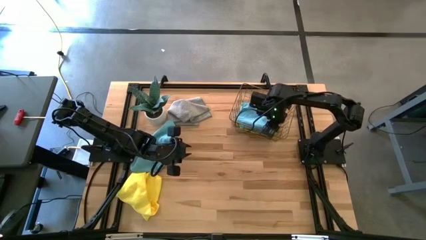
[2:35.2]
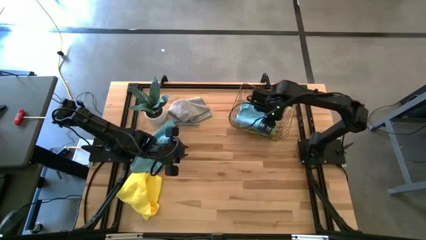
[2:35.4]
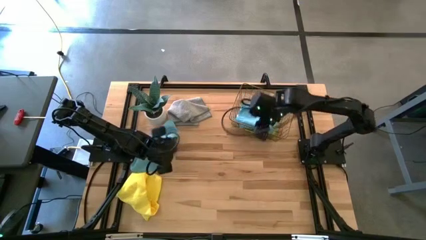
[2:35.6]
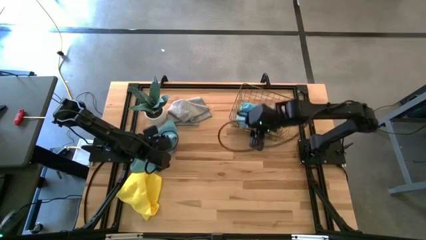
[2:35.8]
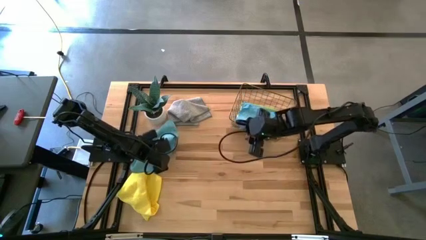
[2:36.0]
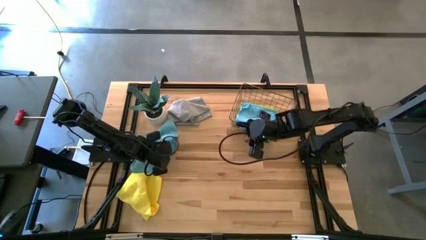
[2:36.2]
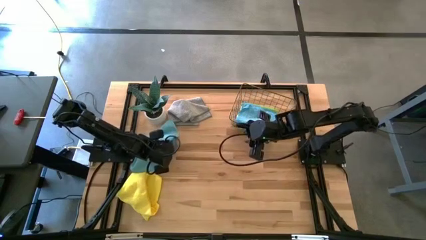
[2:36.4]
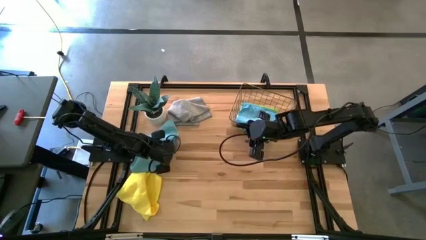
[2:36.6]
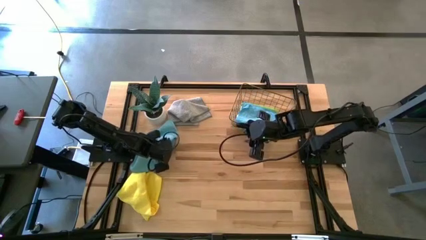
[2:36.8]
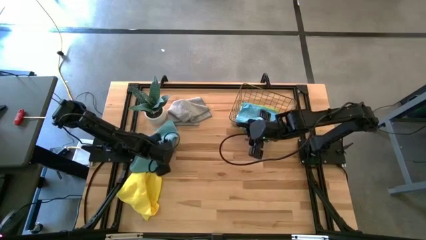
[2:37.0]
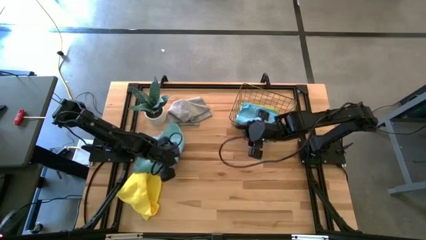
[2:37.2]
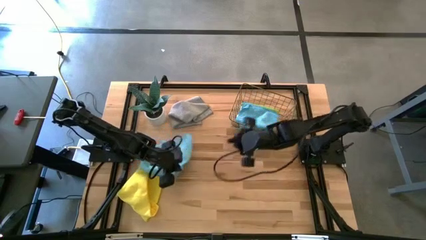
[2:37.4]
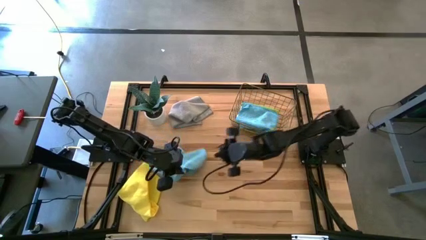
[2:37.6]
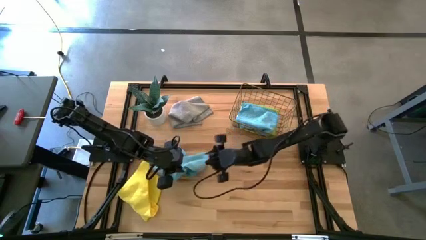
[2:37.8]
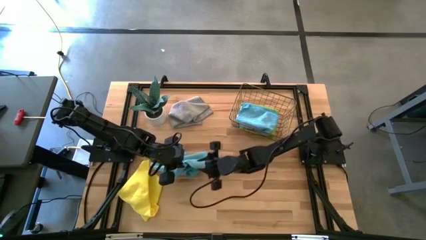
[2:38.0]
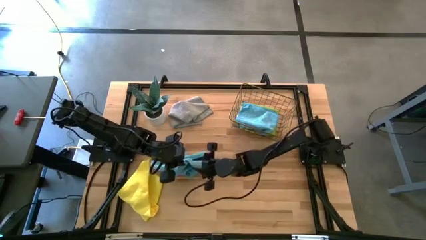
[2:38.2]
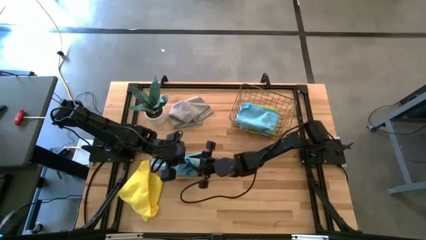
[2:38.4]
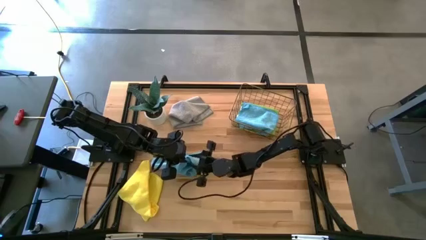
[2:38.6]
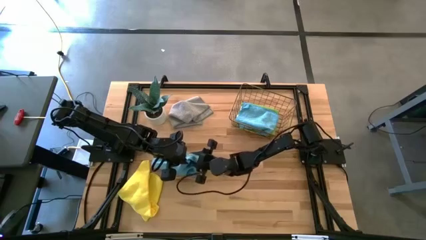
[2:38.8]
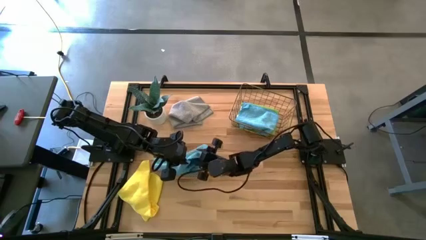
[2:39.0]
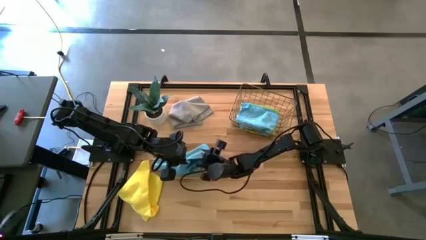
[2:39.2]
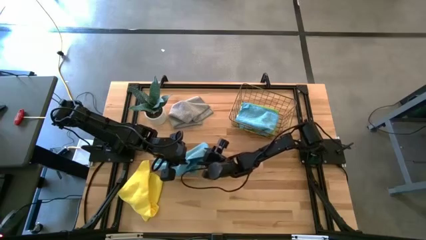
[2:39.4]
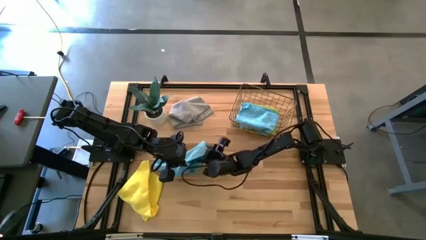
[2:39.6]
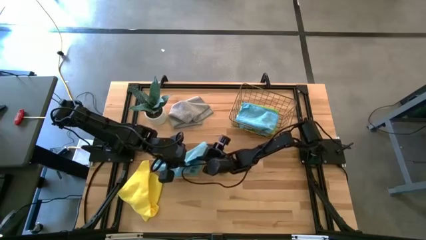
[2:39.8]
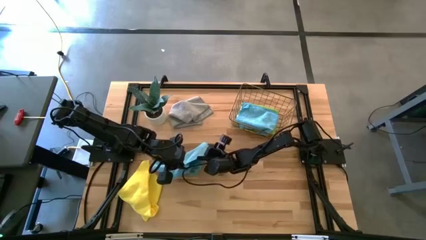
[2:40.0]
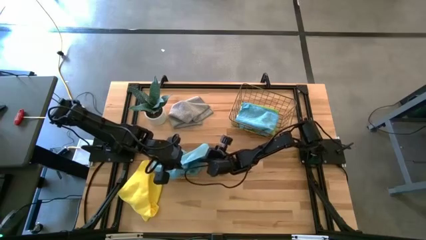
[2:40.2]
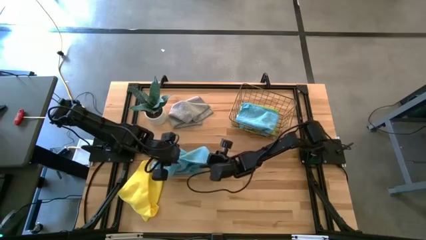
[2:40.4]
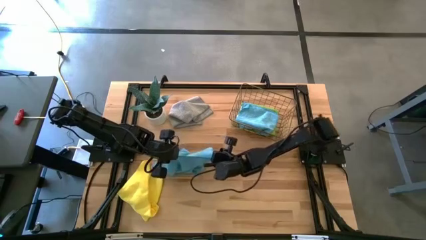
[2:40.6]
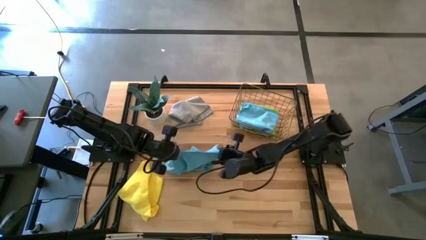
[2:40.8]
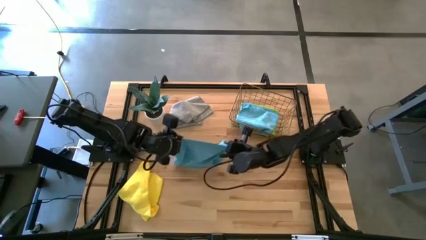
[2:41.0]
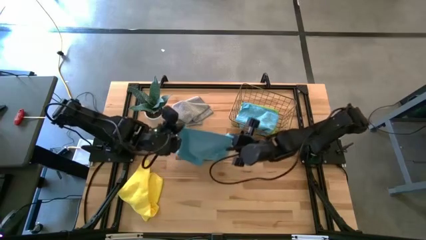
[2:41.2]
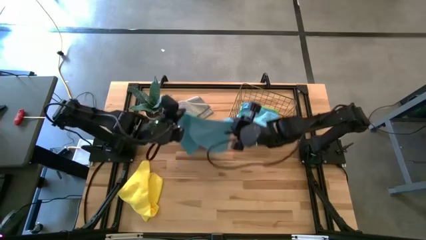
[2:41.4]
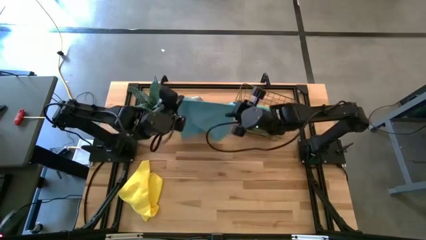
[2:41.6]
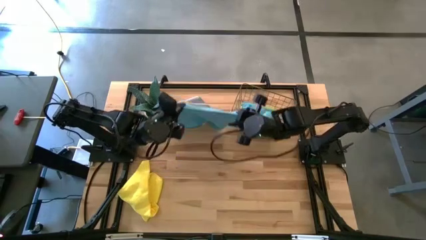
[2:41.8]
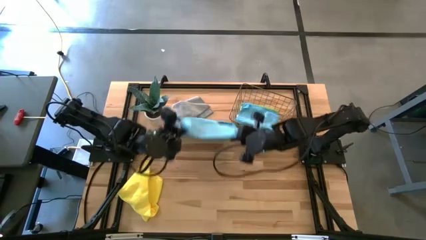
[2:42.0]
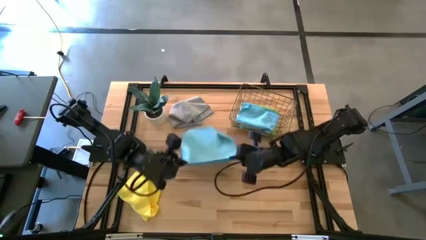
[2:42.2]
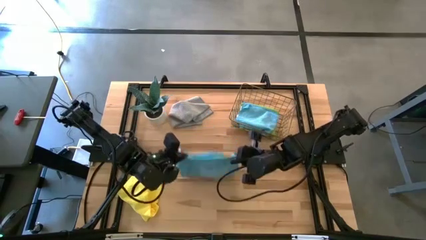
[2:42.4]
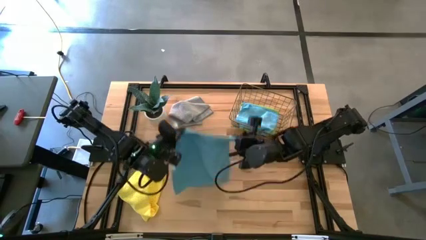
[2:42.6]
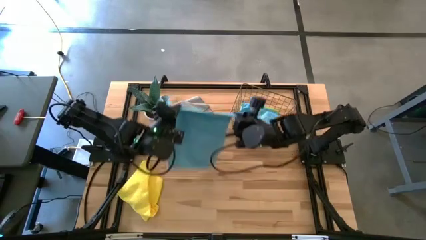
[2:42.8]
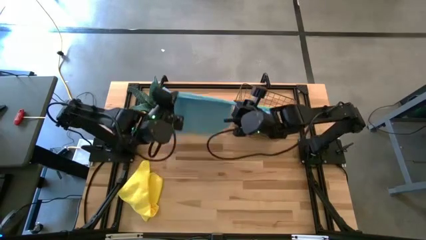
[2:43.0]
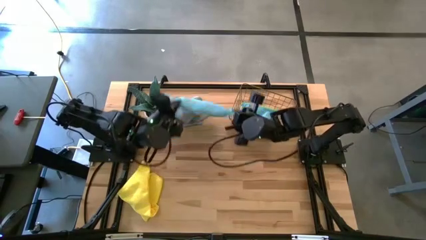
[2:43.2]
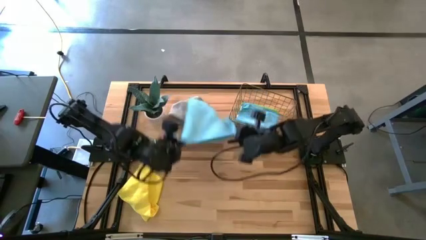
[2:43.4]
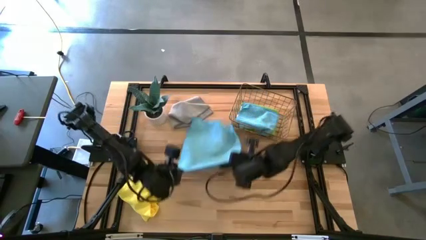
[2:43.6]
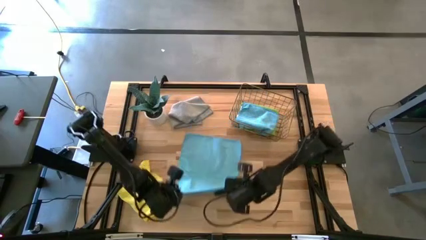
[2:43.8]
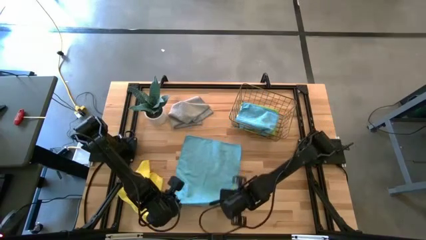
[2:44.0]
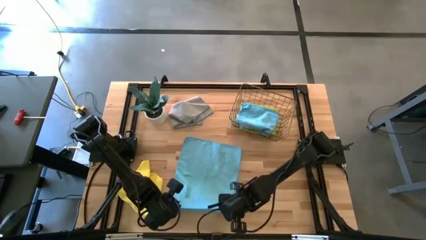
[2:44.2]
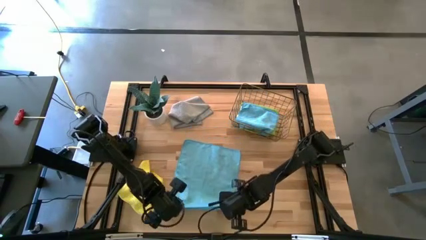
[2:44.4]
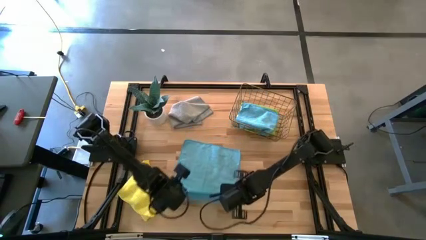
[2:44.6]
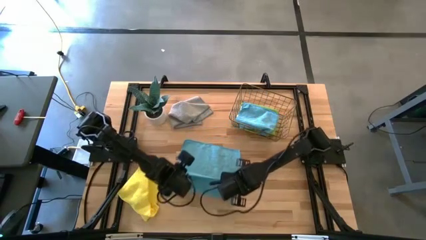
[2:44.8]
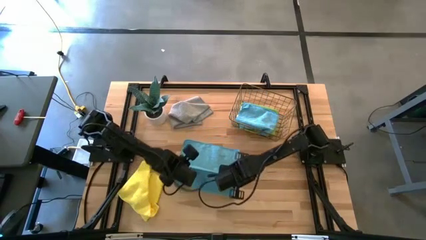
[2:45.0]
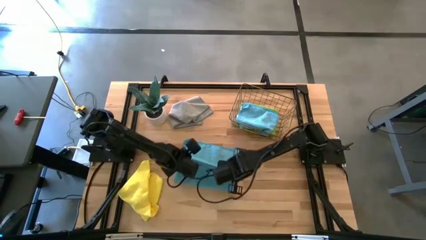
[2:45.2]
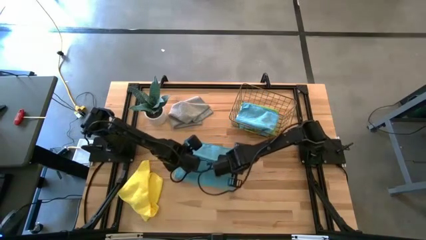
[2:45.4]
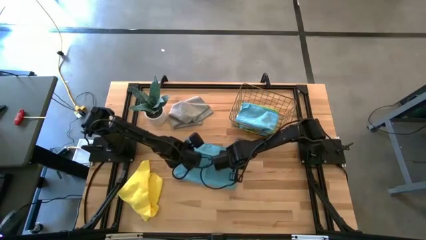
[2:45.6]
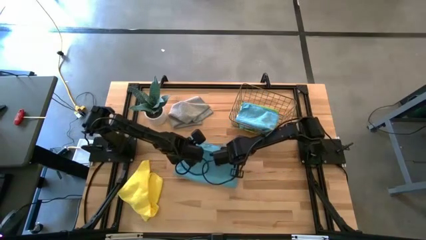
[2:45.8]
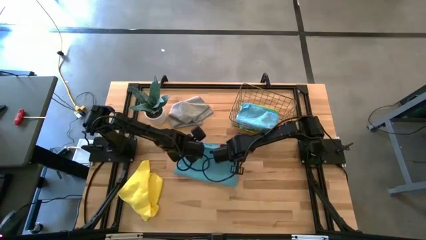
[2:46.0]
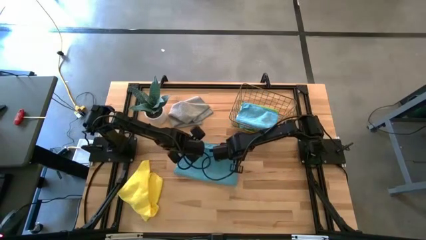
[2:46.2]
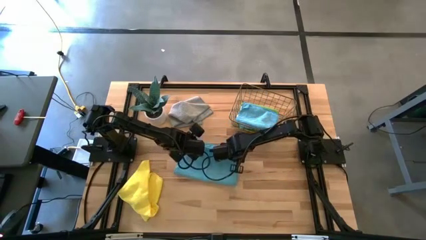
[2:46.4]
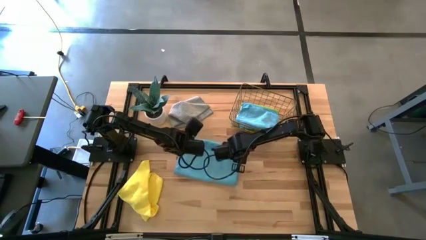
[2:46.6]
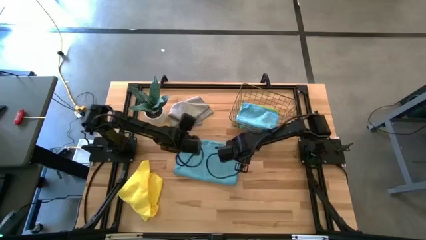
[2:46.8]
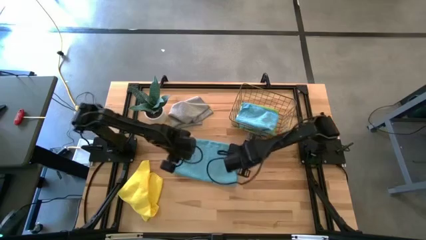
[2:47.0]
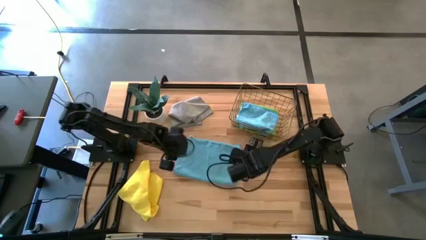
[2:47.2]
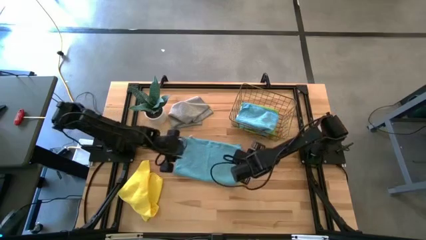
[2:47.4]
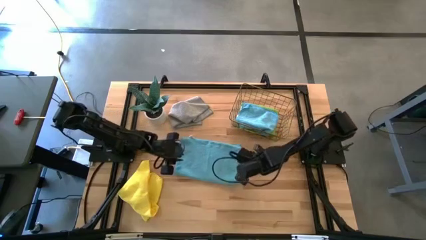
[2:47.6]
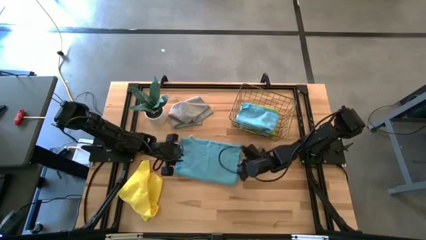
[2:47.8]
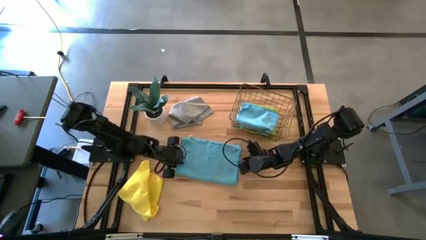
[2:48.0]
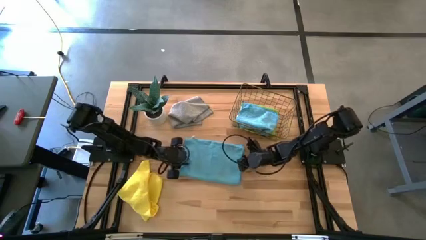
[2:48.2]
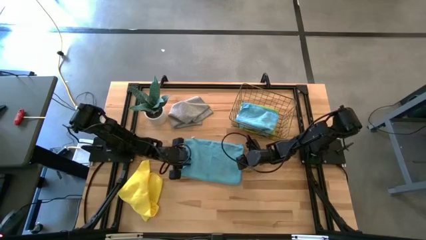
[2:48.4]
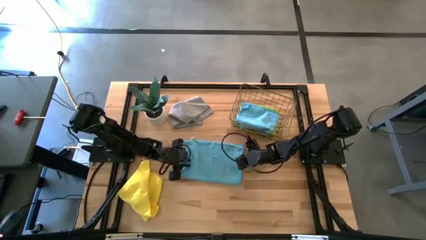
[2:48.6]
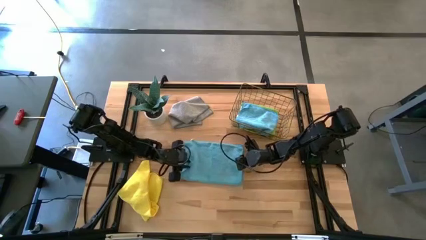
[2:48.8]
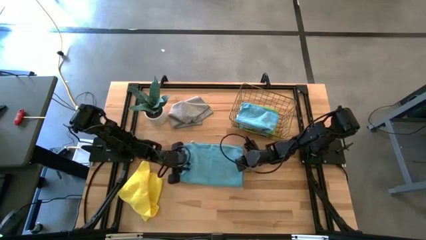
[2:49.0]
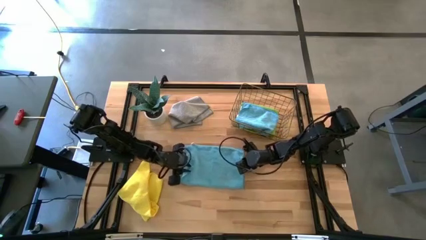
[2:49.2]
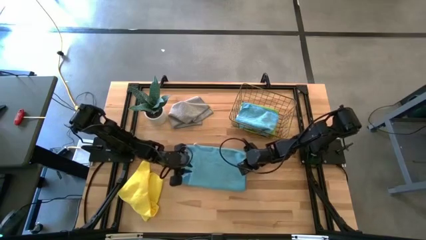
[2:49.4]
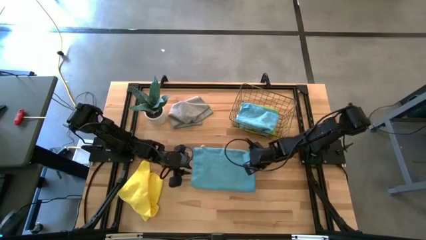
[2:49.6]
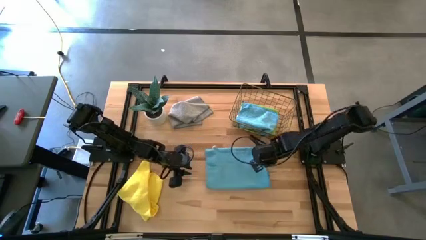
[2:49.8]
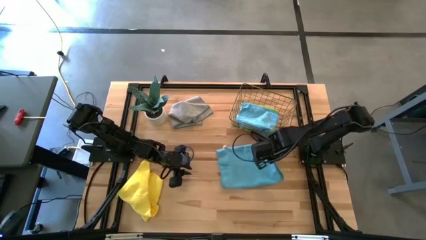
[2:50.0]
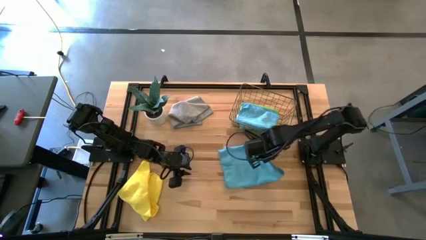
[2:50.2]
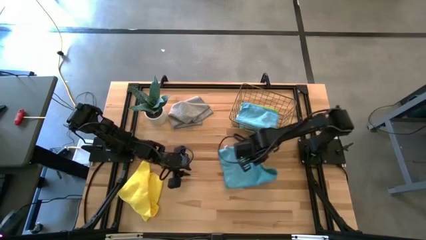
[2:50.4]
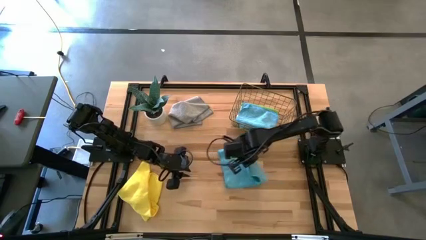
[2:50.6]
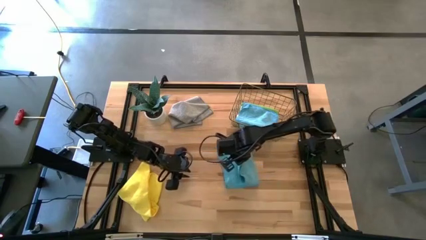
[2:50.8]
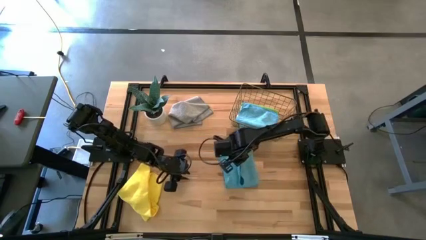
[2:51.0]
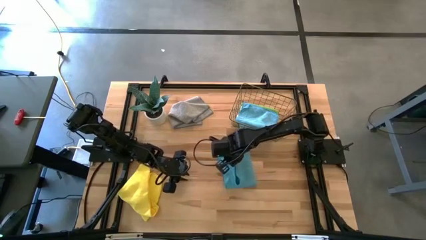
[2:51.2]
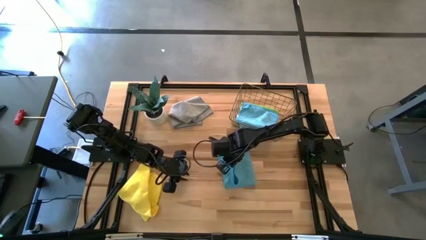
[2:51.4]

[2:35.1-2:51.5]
Task: Fold microfiber towels
Fold the blue microfiber towel
